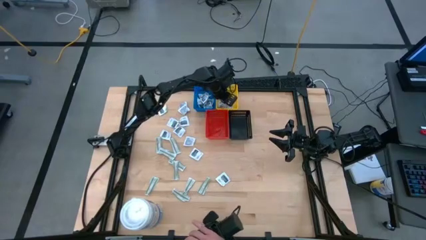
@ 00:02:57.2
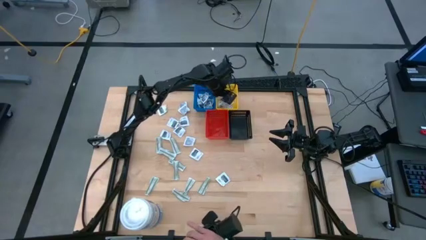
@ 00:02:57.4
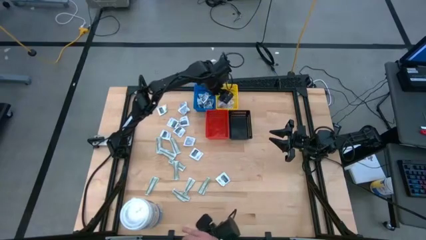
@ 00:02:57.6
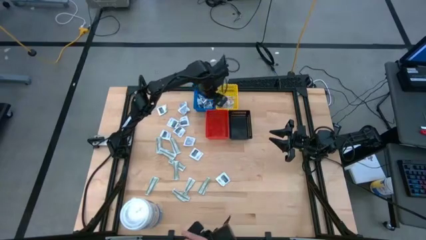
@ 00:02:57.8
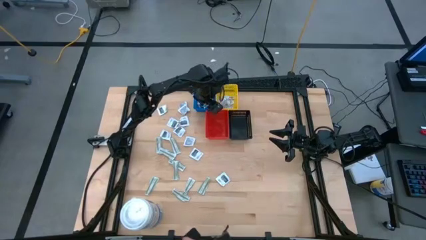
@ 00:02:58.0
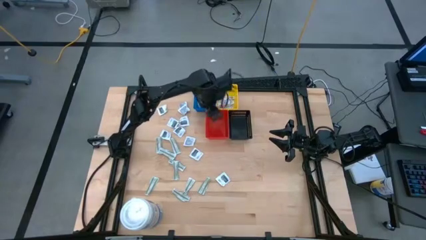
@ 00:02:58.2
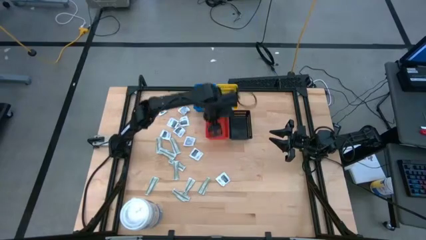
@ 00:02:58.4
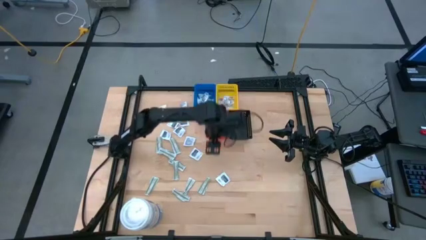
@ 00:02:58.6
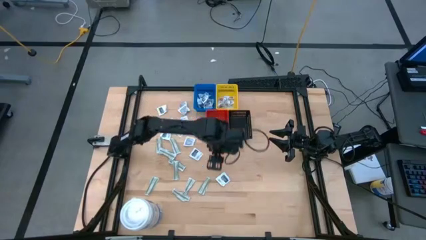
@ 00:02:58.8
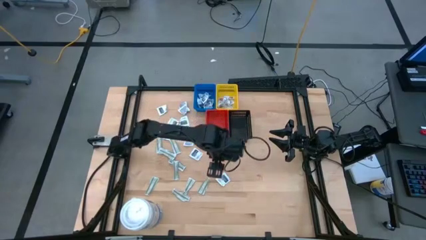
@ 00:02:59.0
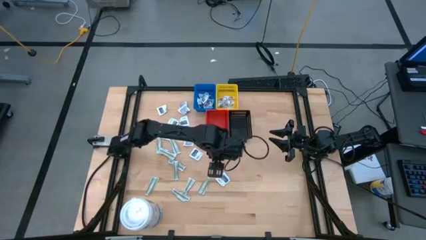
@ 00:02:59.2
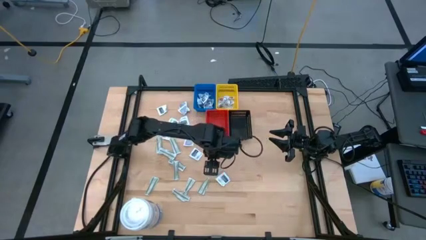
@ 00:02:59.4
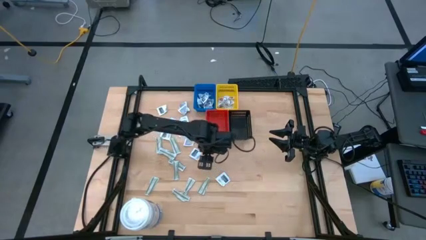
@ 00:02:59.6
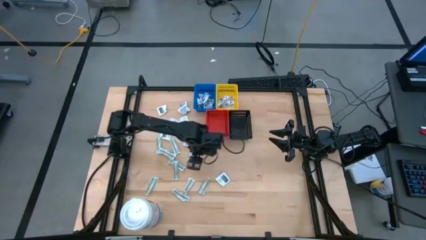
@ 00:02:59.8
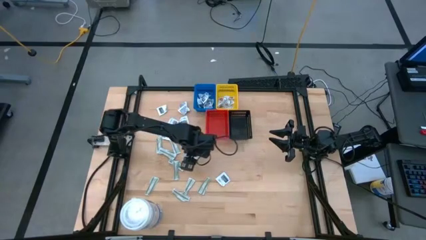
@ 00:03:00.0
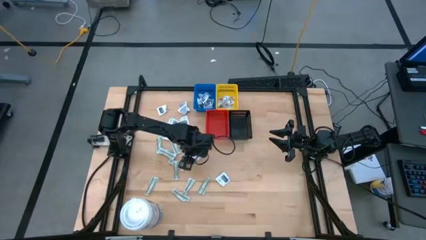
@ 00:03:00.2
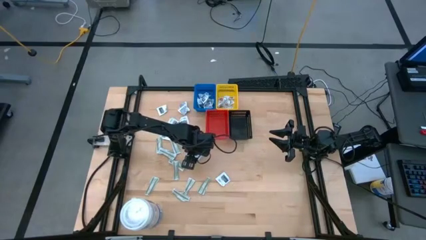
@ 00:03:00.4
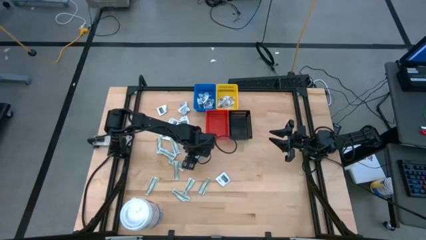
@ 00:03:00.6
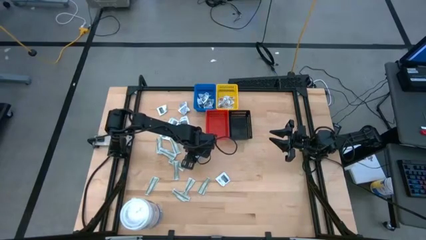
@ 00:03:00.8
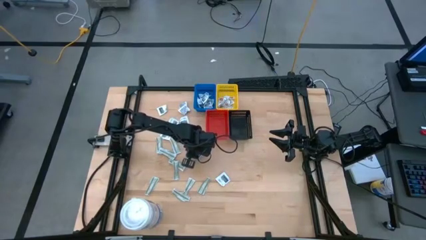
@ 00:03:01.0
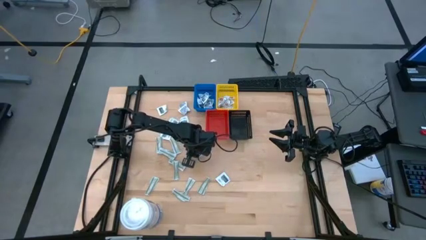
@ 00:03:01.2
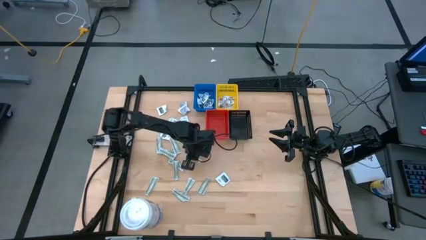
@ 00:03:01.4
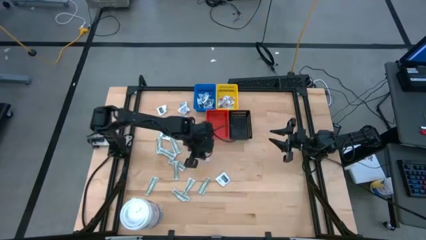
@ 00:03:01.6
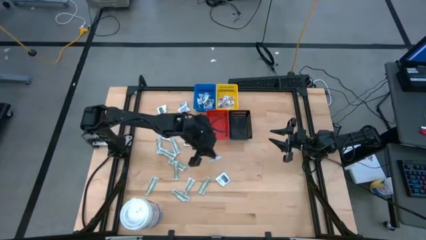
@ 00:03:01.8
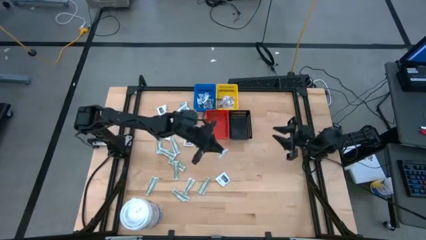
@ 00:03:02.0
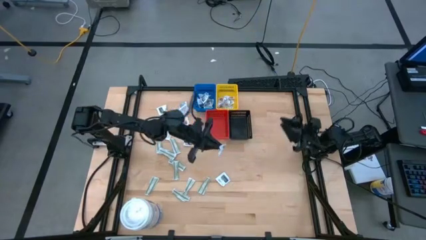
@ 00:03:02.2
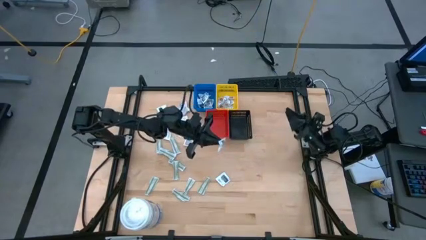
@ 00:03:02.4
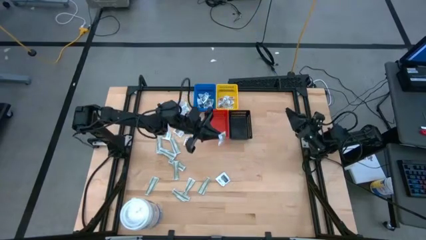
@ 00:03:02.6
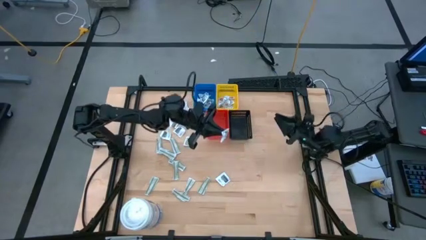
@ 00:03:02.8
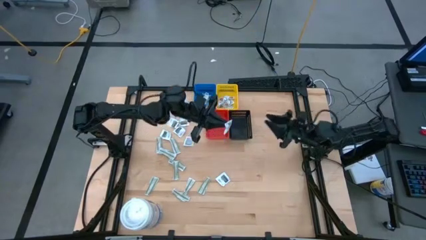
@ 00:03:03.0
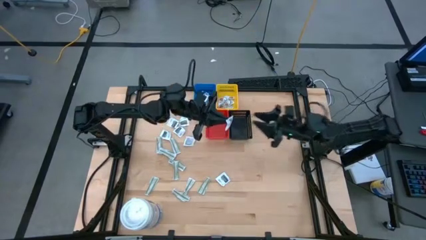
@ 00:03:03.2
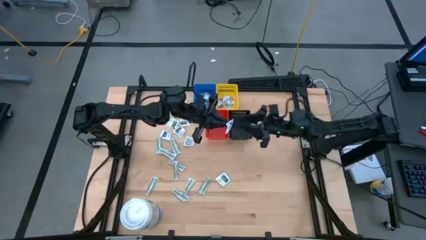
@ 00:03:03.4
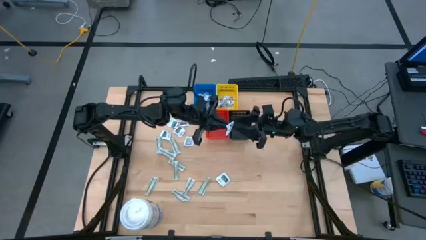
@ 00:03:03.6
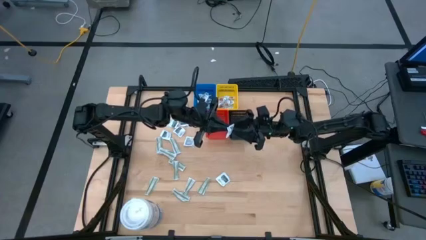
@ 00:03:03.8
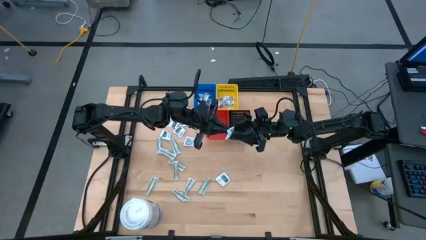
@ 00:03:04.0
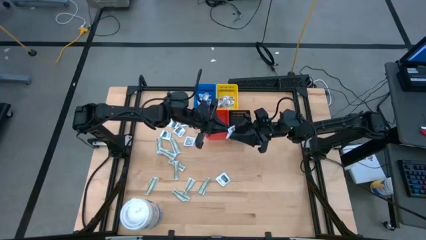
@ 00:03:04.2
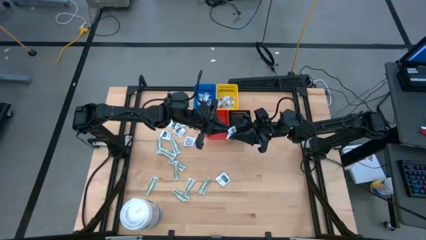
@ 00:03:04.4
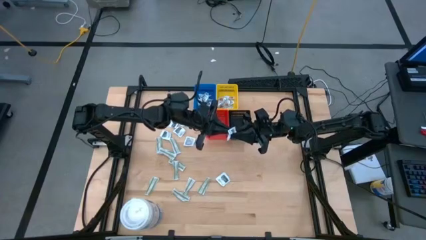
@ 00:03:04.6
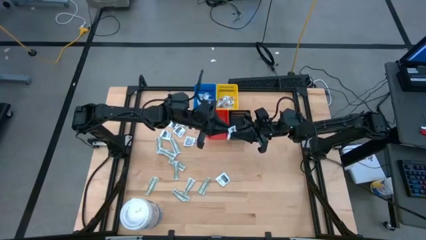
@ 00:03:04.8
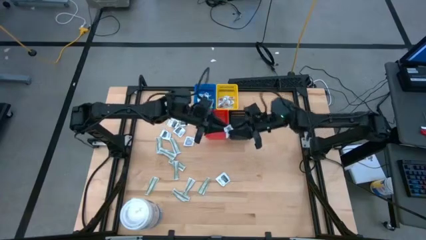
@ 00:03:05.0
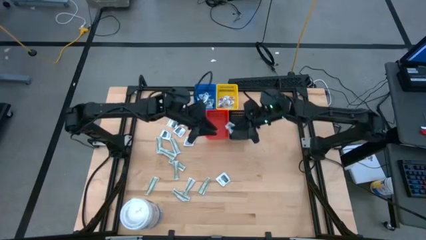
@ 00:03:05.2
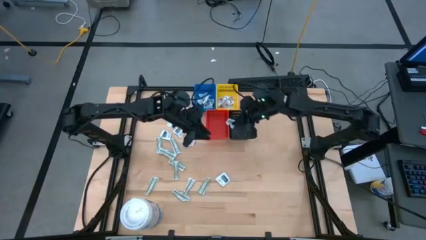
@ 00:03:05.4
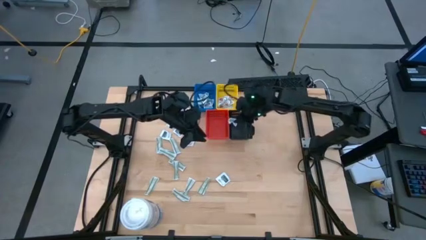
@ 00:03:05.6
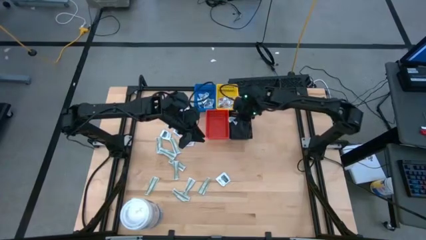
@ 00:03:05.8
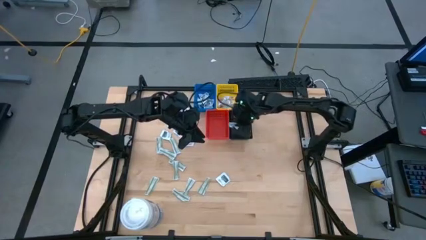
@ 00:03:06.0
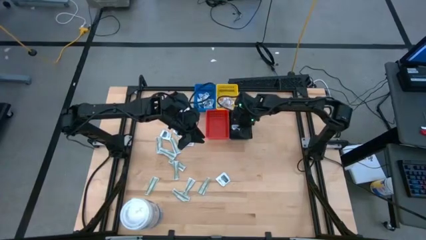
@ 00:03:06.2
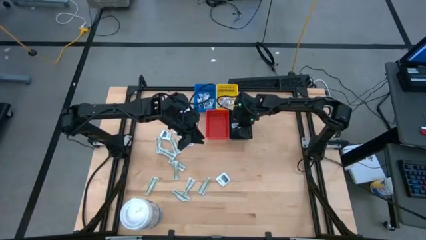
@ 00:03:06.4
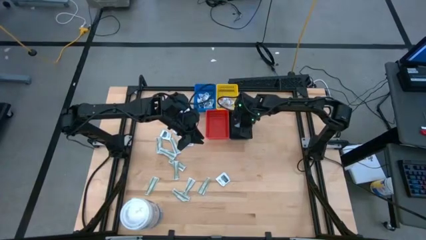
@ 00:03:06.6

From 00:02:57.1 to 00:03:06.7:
Task: Pick & Place First Aid Supplies
Put the towelette pack into the black bin

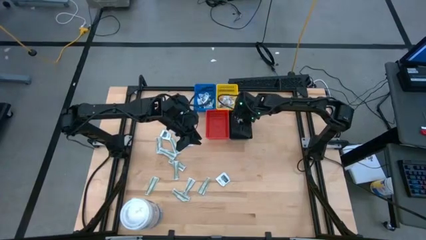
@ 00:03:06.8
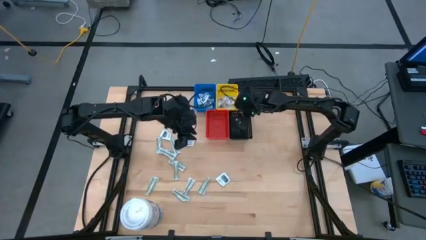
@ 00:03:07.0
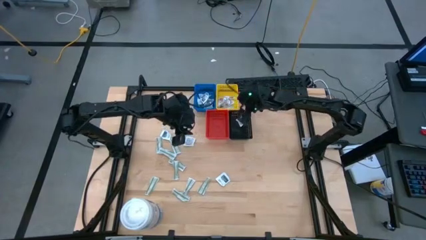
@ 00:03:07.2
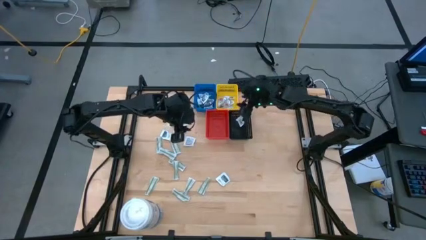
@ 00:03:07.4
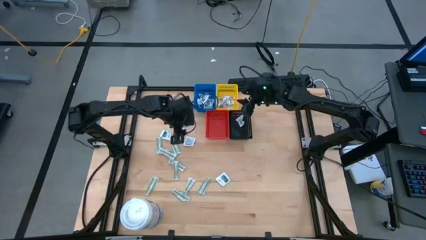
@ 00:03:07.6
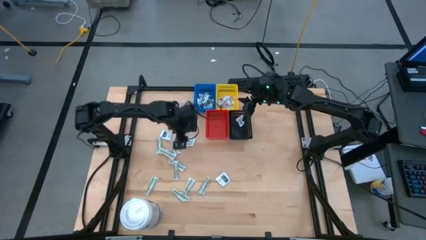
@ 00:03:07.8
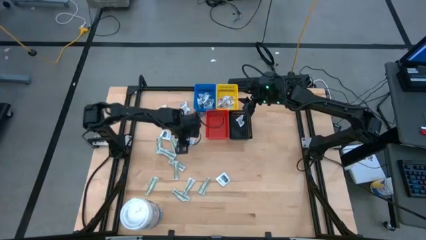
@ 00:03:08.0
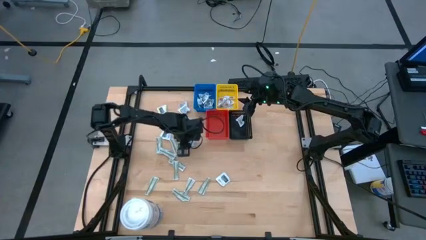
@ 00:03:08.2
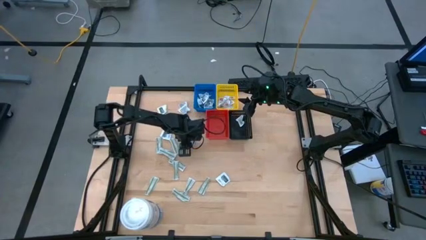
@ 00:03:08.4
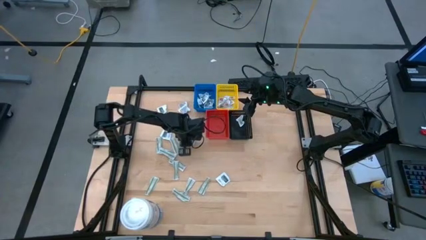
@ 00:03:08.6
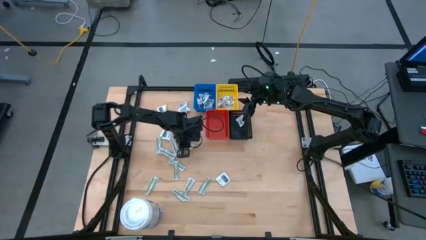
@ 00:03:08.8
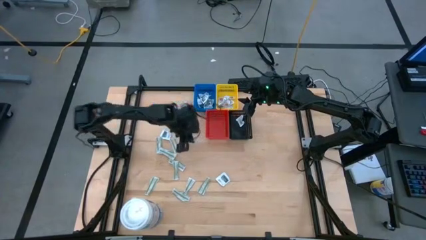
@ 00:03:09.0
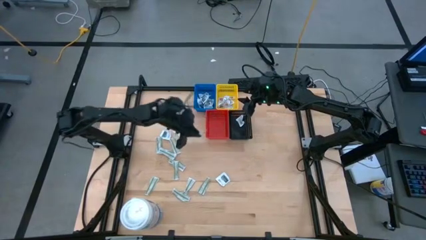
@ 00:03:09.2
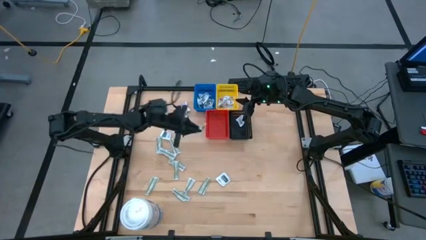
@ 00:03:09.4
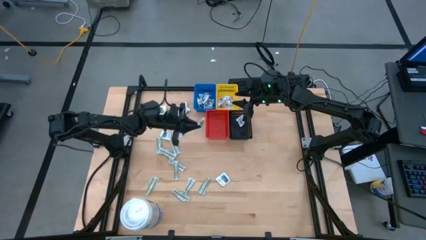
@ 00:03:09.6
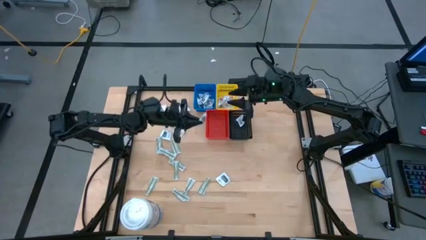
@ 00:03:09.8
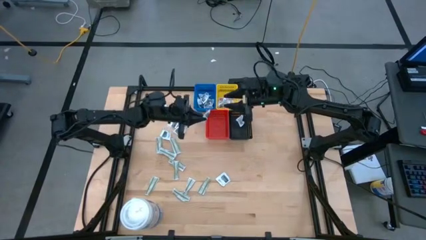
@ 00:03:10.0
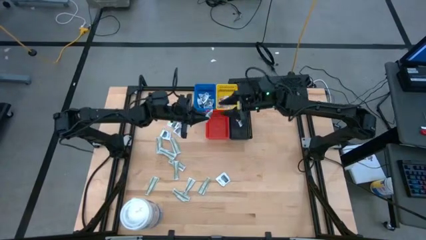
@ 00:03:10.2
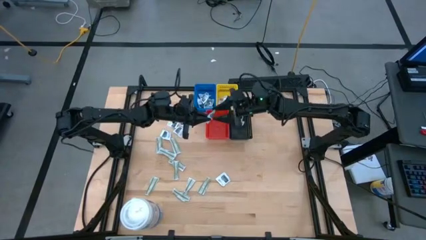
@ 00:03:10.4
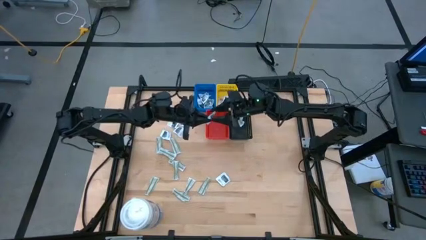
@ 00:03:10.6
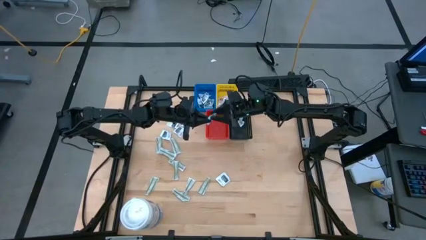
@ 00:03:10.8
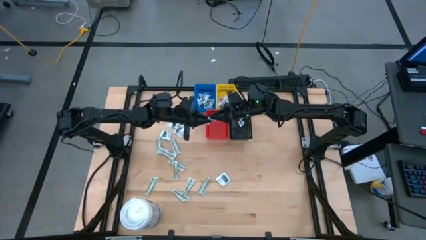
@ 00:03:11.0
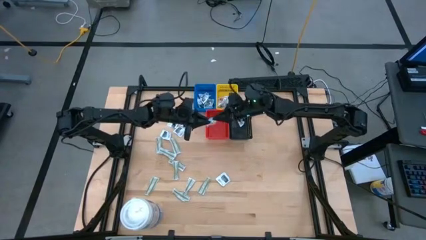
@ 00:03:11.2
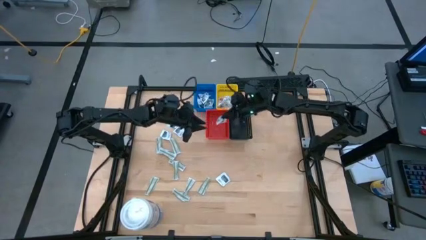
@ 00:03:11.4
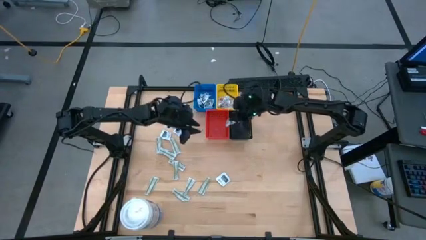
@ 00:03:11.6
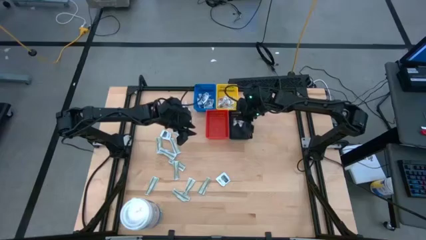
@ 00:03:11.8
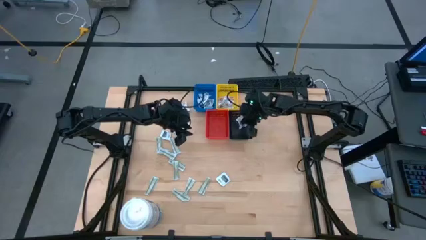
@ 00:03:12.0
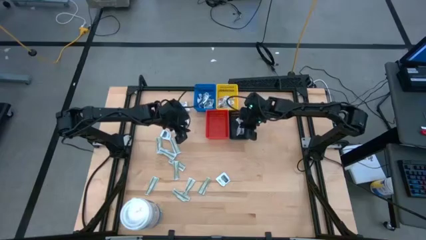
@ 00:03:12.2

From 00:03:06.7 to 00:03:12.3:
Put the towelette pack into the black bin
